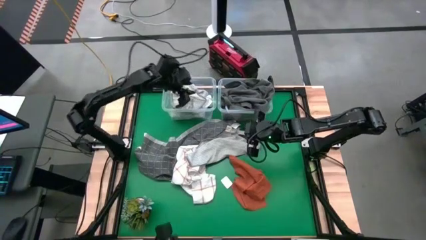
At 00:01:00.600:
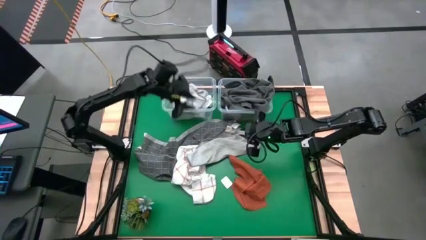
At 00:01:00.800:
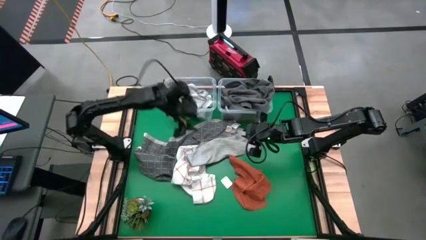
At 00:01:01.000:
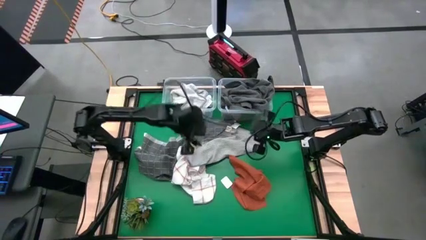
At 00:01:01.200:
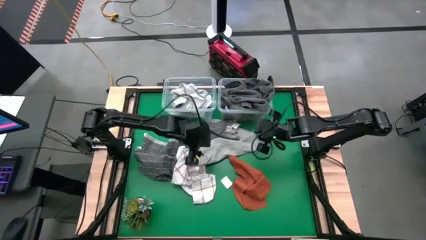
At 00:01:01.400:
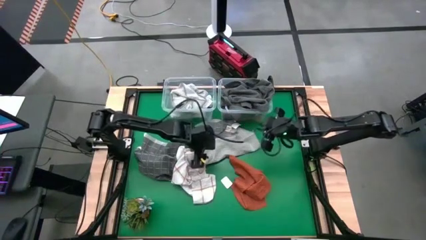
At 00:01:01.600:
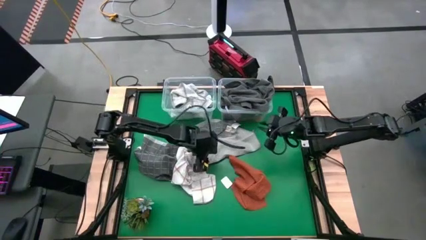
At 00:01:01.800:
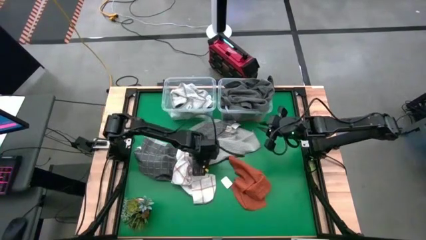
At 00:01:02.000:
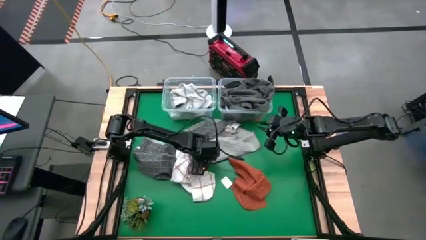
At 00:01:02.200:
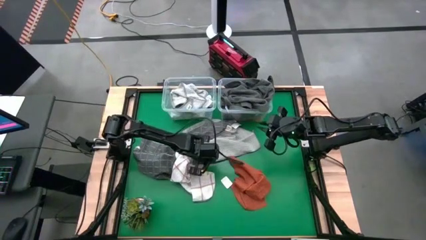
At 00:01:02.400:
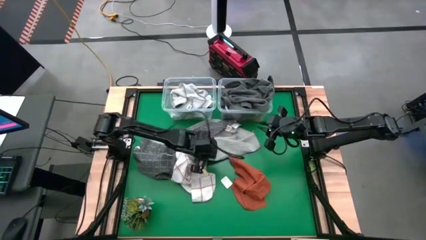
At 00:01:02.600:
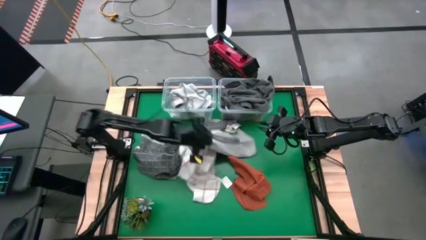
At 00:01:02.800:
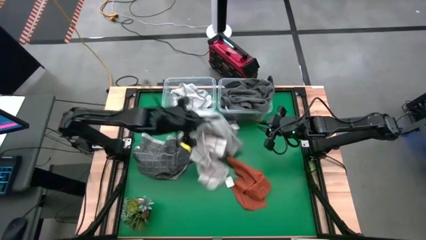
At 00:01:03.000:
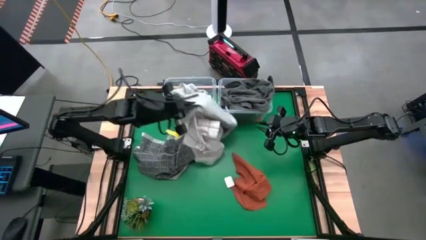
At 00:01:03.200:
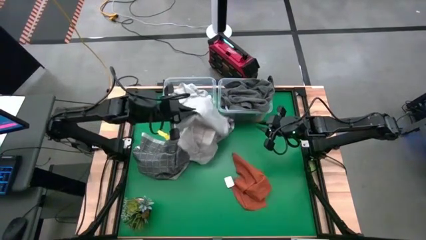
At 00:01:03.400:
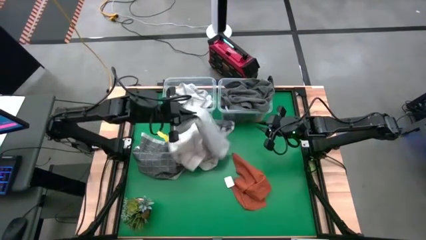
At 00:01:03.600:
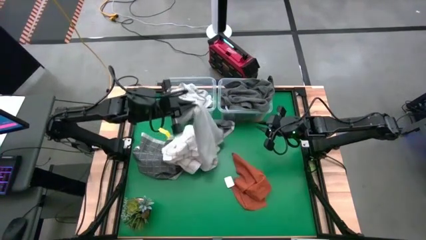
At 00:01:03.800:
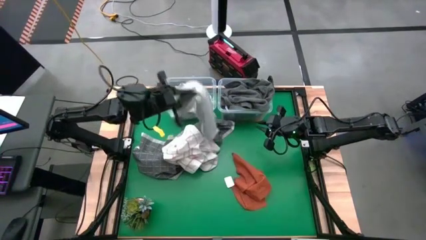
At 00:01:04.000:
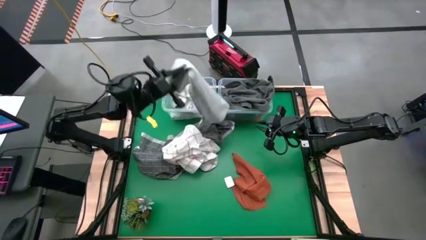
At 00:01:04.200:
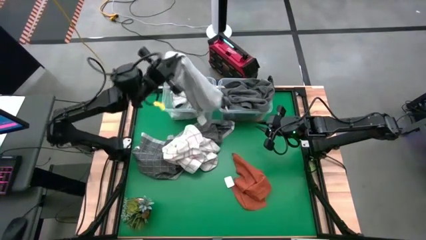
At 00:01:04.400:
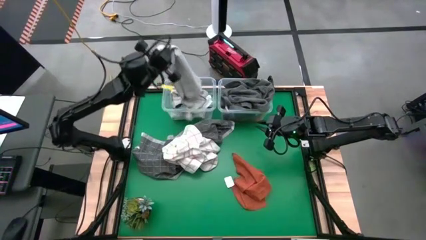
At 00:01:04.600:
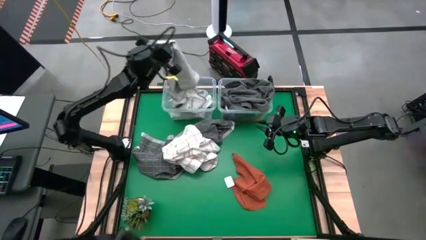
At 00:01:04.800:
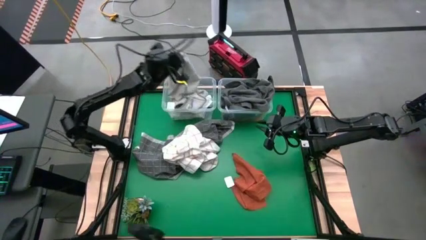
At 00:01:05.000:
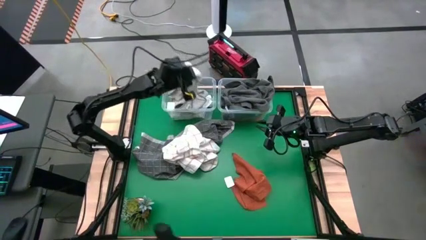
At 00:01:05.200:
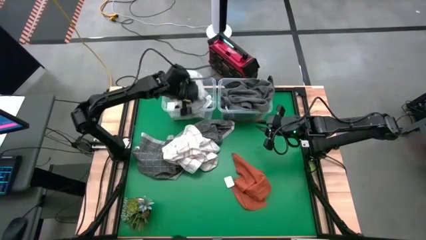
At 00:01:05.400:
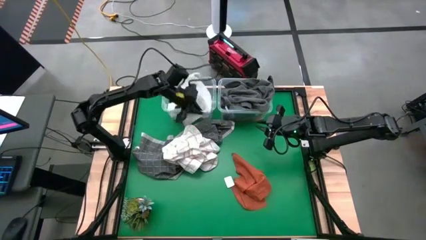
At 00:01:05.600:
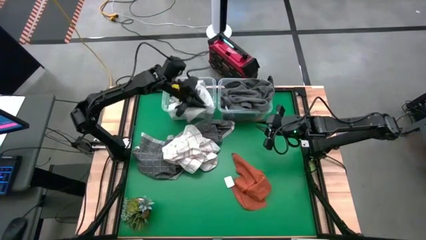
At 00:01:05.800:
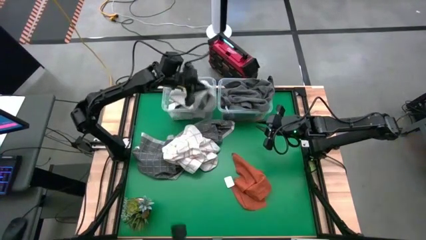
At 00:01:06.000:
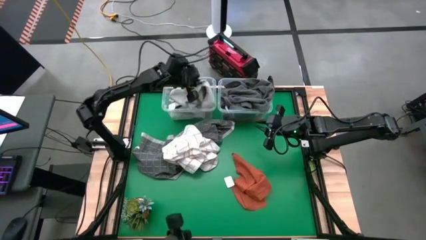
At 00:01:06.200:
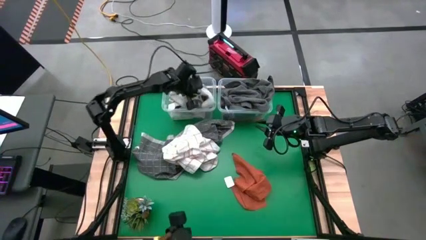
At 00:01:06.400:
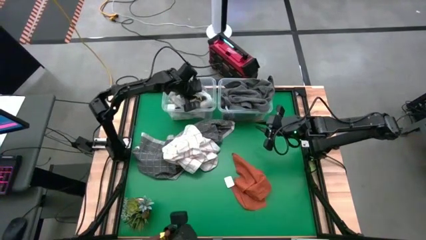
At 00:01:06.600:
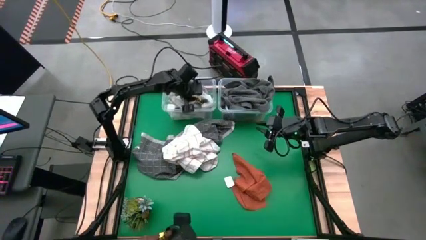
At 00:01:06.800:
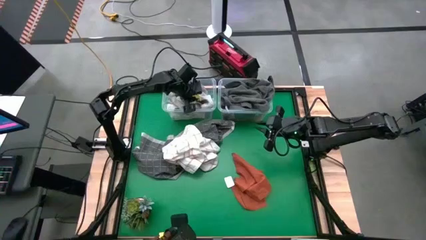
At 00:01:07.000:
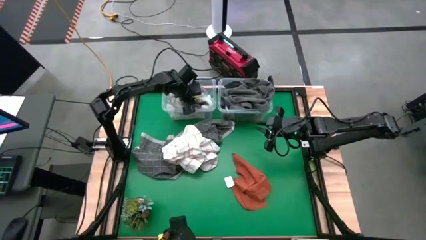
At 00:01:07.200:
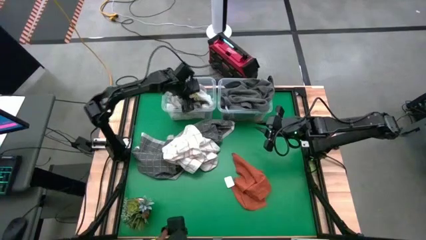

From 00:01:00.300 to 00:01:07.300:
Task: Sort towels by color in basket
Put the gray towel into the left transparent bin

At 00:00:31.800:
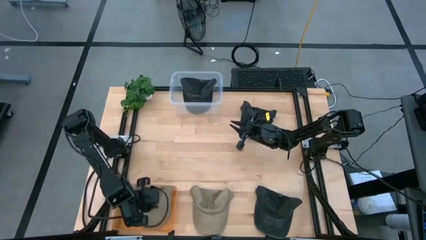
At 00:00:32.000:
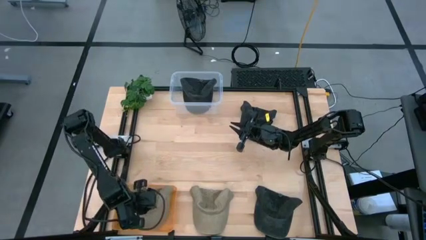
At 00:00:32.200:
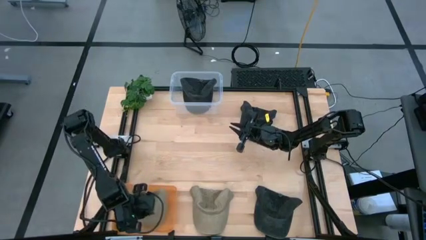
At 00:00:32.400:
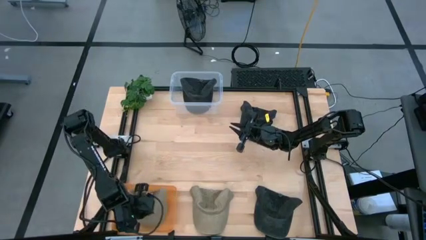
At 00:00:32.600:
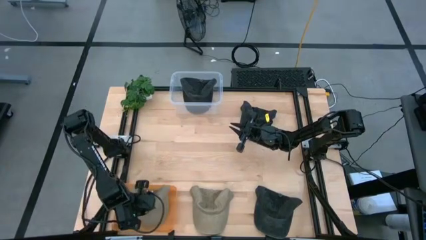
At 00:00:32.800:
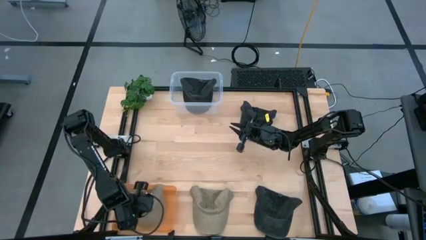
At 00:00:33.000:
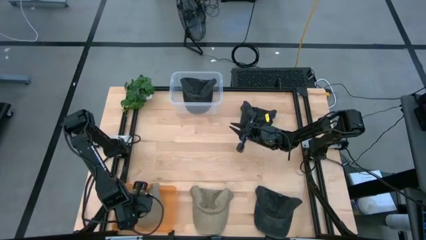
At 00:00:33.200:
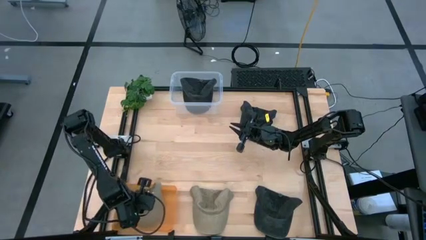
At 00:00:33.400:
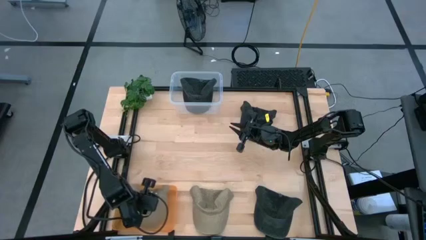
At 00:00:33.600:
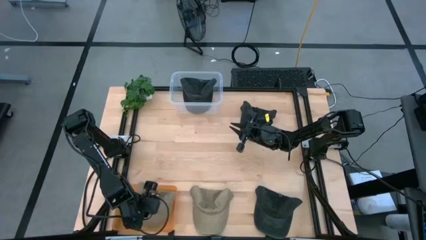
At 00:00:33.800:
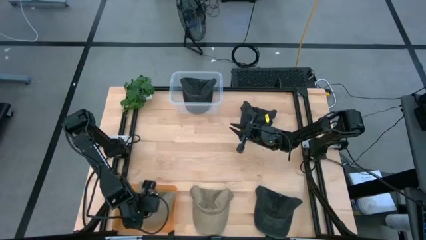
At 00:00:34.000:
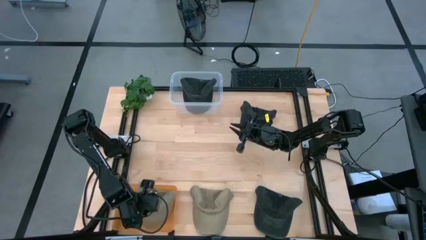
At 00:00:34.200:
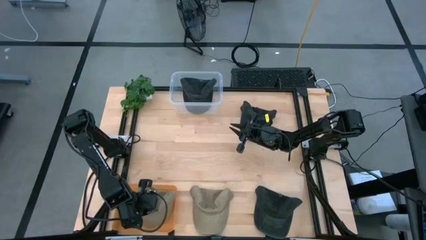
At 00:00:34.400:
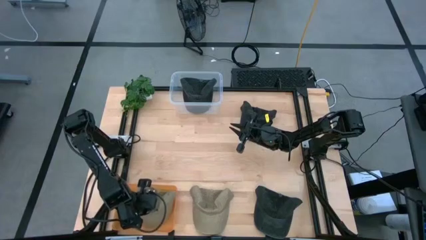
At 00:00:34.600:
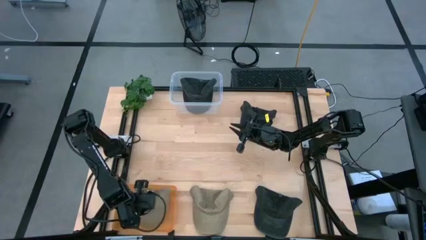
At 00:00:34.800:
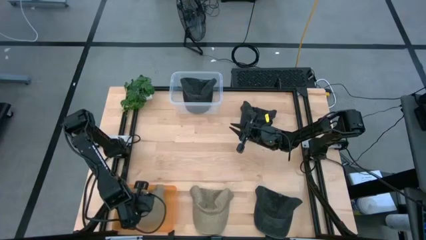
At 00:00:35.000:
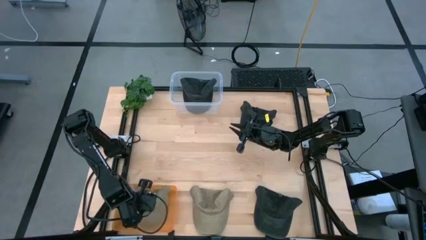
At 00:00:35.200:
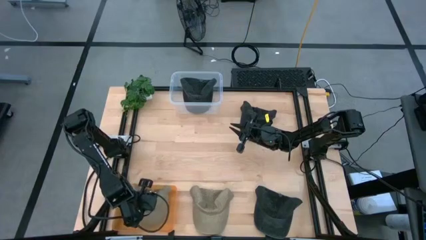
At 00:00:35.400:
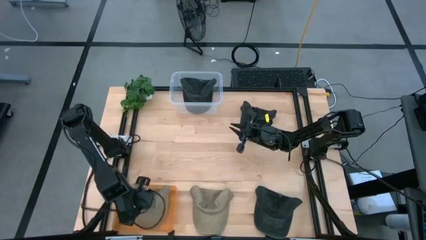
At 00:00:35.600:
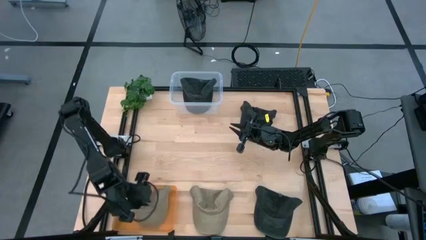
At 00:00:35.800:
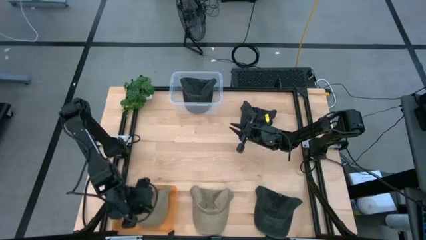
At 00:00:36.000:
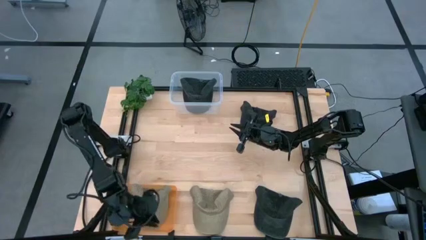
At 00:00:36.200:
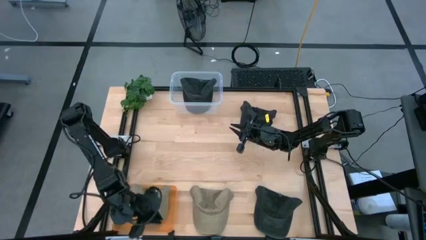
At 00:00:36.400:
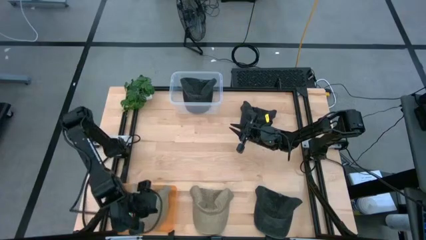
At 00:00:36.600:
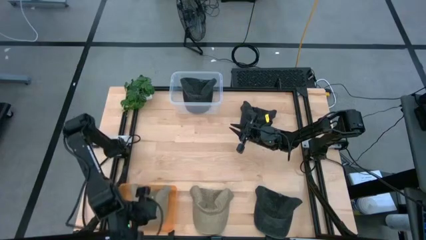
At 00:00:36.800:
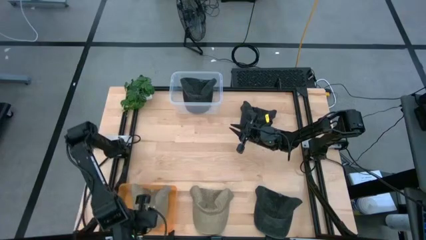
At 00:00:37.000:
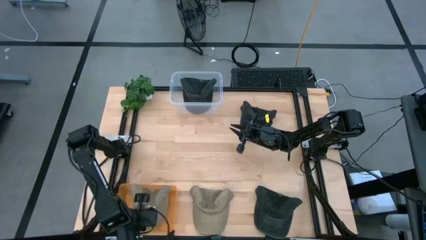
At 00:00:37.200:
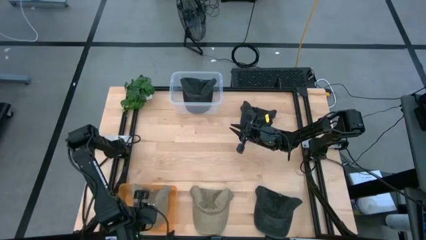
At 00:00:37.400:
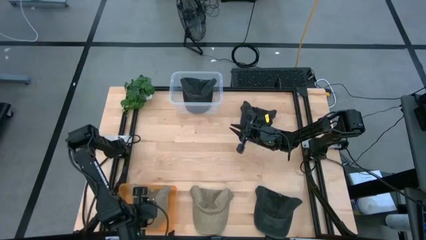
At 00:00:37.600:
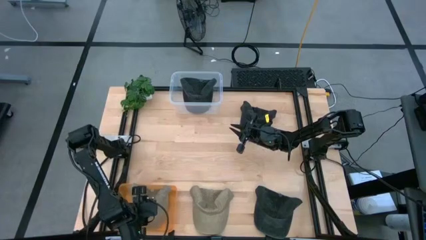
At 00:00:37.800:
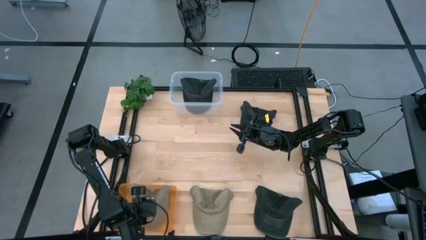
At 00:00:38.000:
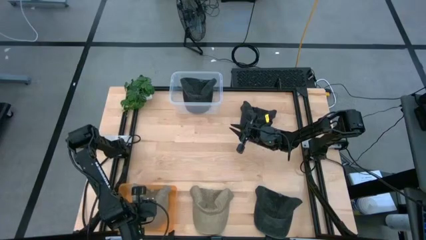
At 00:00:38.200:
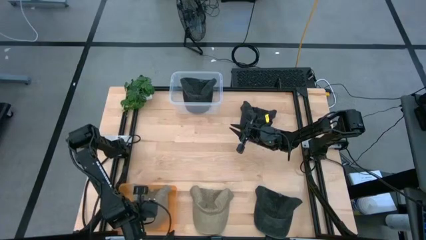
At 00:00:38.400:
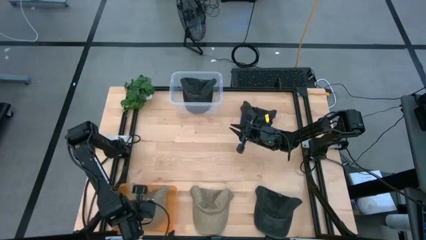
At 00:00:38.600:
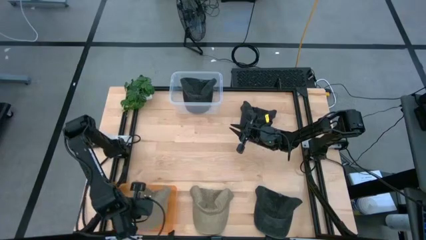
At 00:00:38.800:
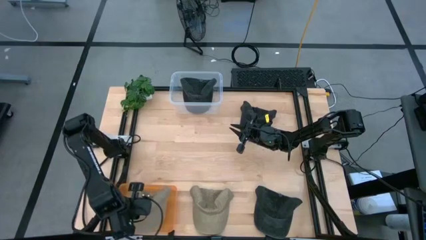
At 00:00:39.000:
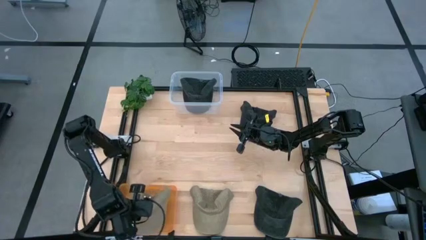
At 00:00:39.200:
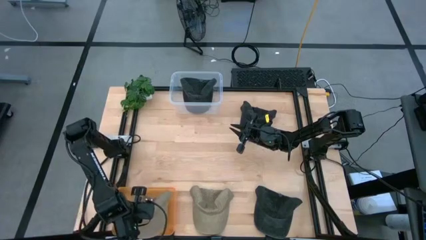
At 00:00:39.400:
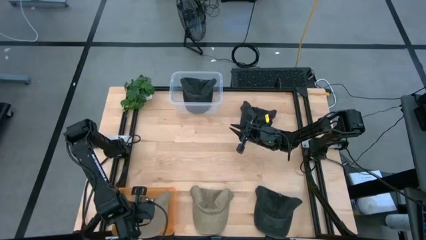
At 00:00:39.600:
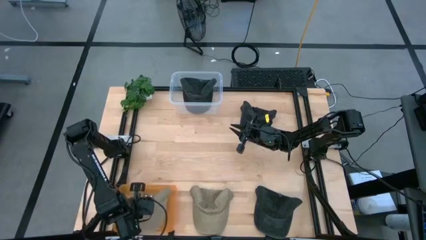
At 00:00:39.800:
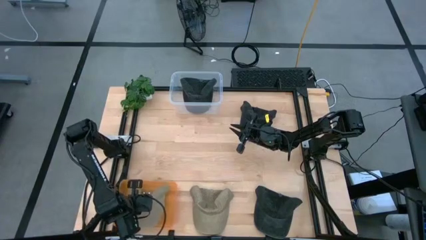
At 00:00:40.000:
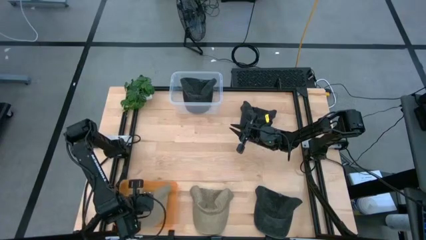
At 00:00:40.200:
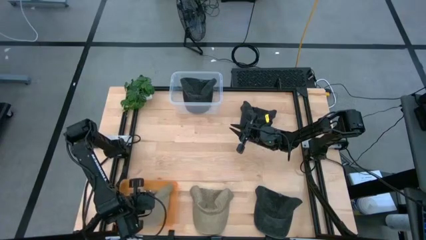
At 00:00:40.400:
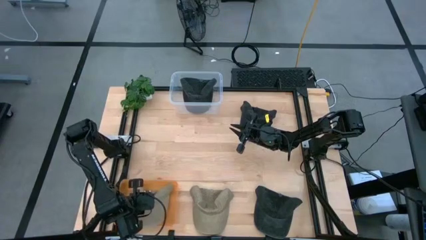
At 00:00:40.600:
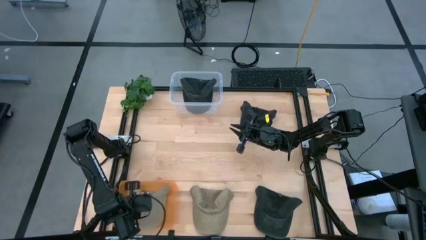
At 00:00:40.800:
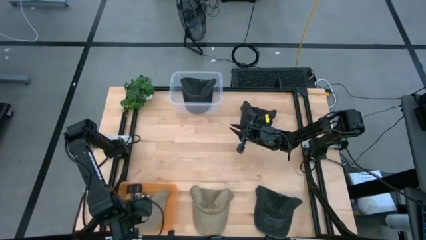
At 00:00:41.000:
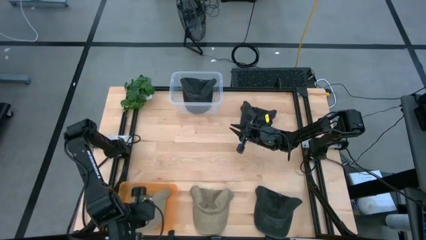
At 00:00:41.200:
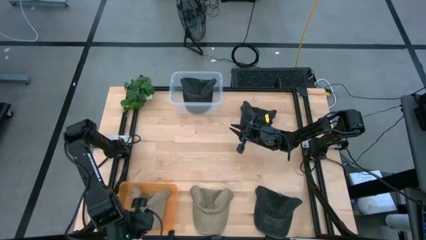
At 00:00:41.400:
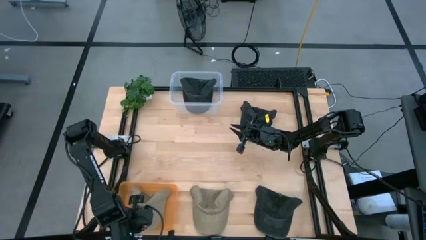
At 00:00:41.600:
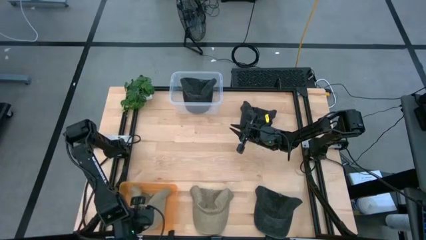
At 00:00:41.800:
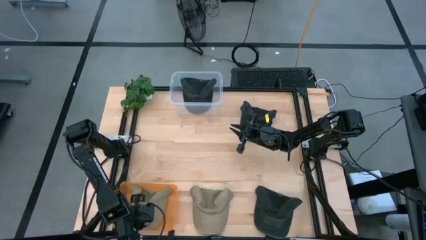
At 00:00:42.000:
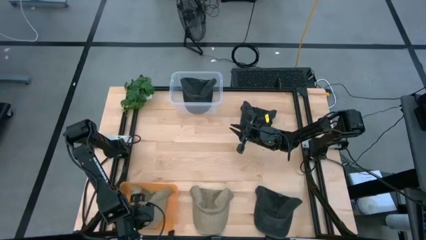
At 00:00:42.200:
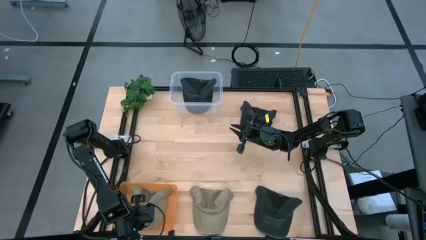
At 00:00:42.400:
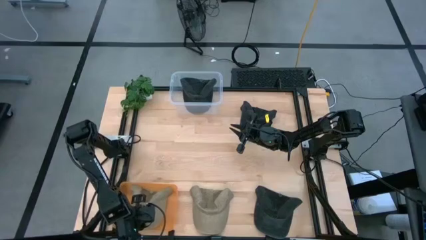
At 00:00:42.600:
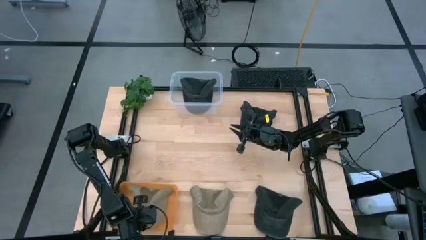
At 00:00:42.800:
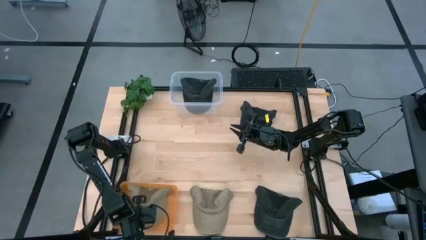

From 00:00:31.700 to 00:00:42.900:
Task: Pick & Place hat
Put the top brown cap into the orange bin
